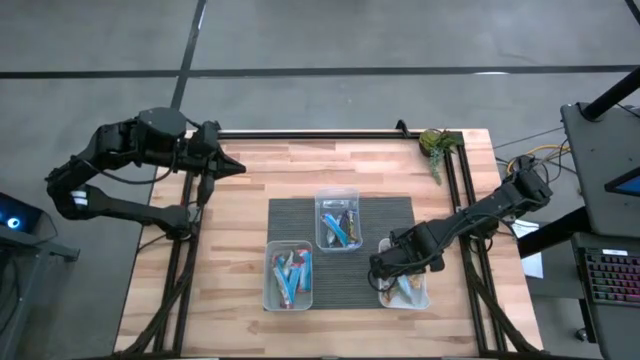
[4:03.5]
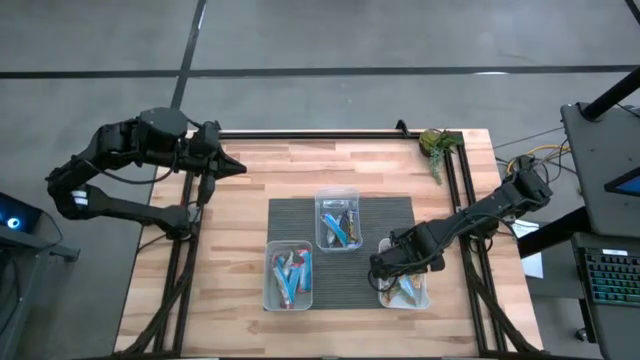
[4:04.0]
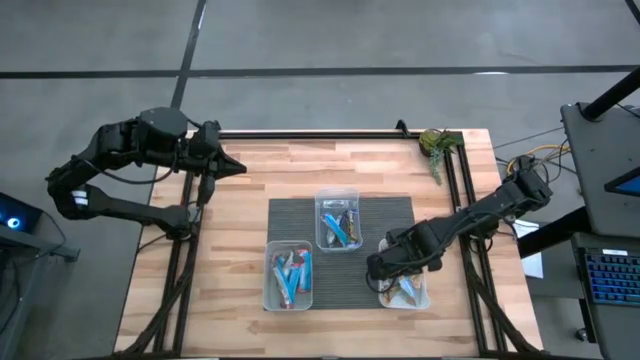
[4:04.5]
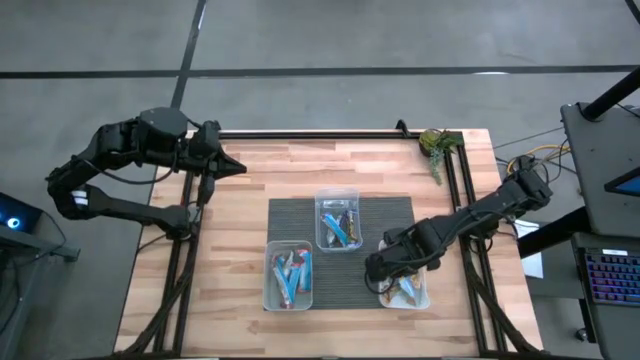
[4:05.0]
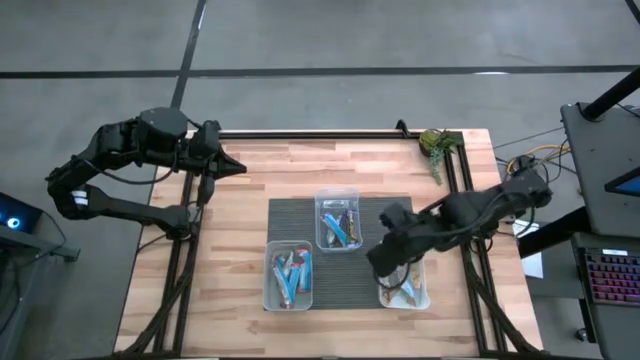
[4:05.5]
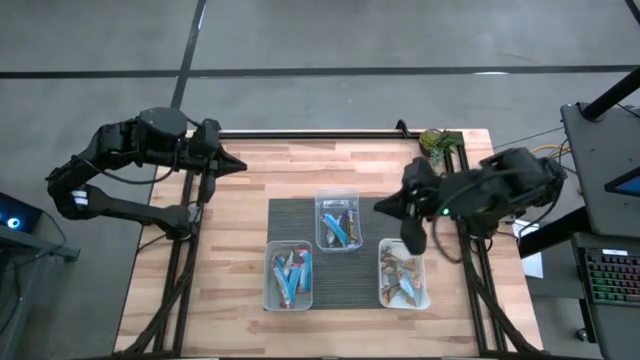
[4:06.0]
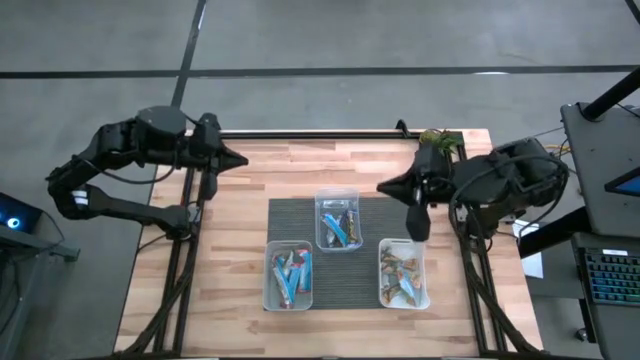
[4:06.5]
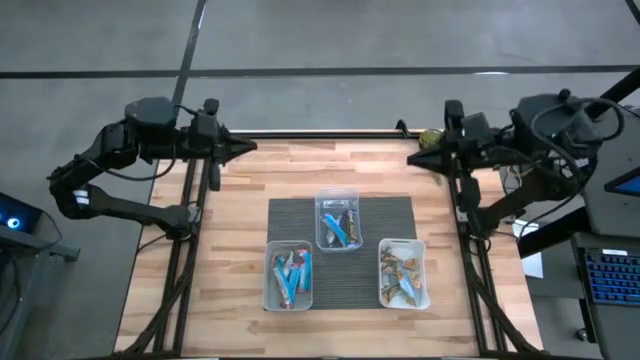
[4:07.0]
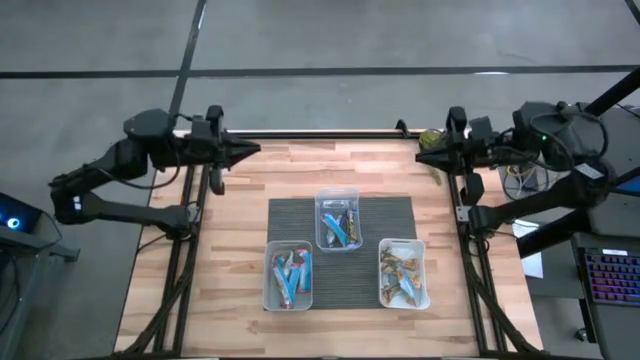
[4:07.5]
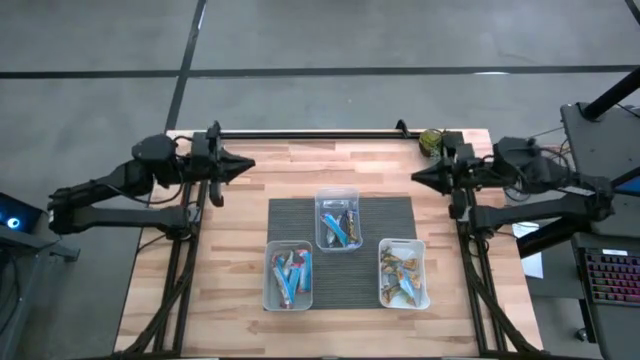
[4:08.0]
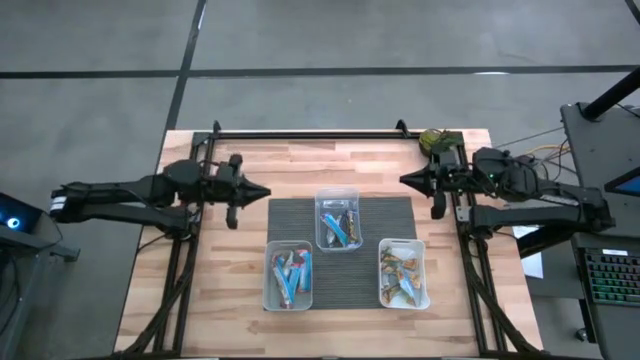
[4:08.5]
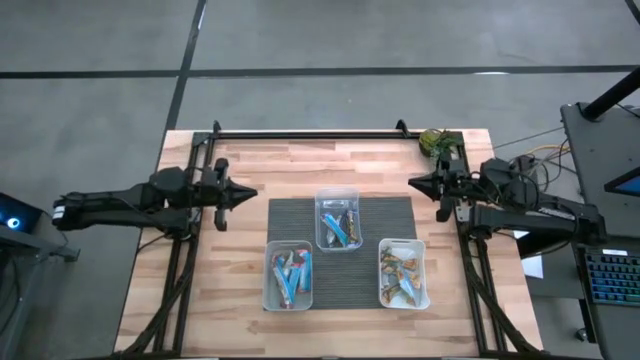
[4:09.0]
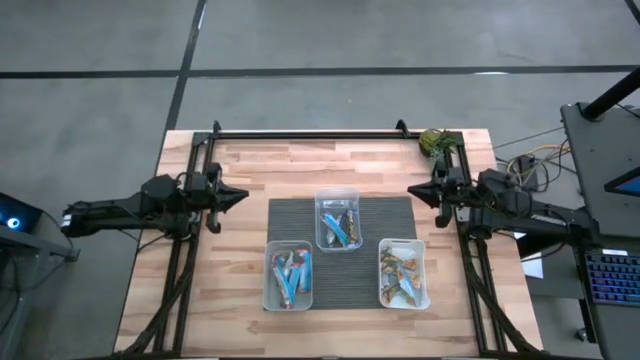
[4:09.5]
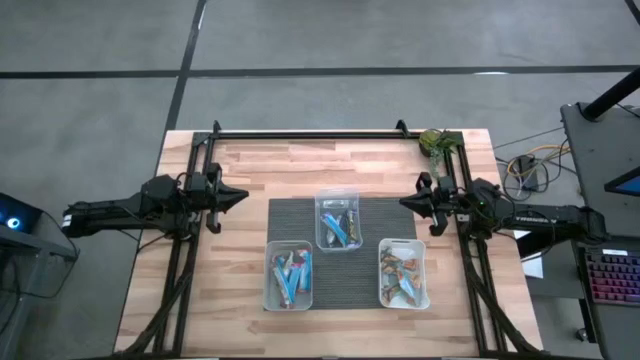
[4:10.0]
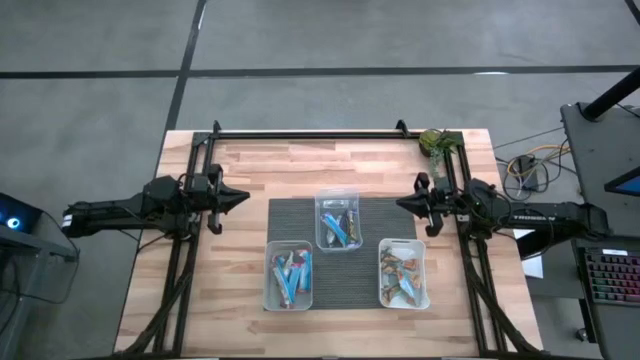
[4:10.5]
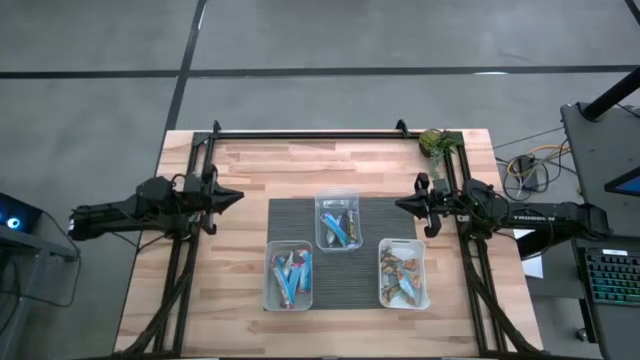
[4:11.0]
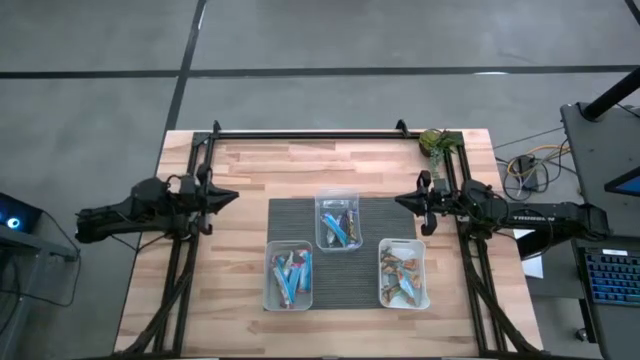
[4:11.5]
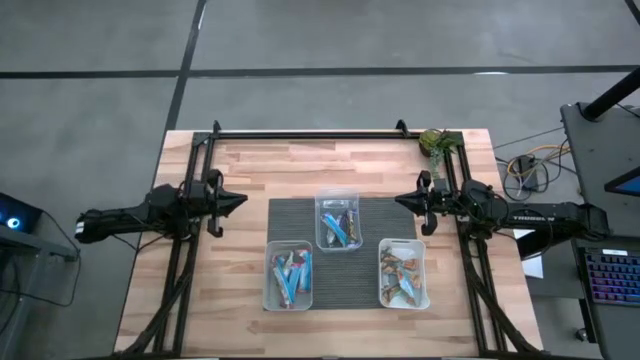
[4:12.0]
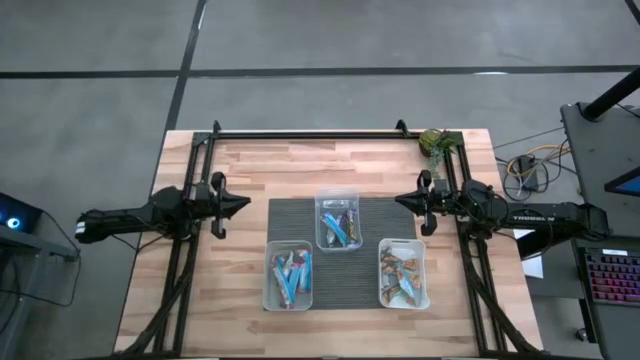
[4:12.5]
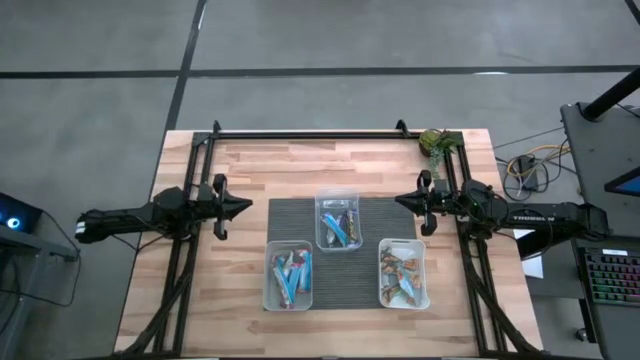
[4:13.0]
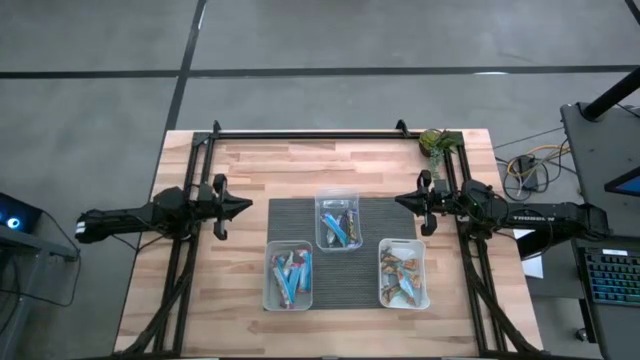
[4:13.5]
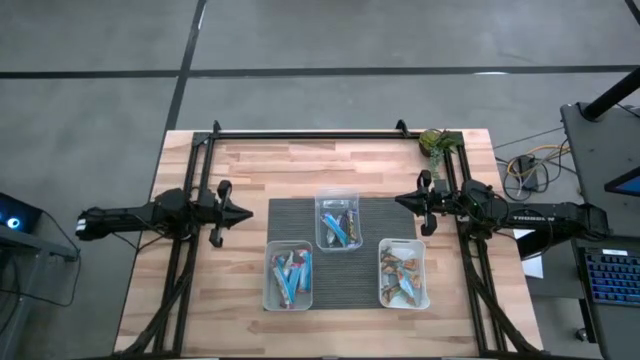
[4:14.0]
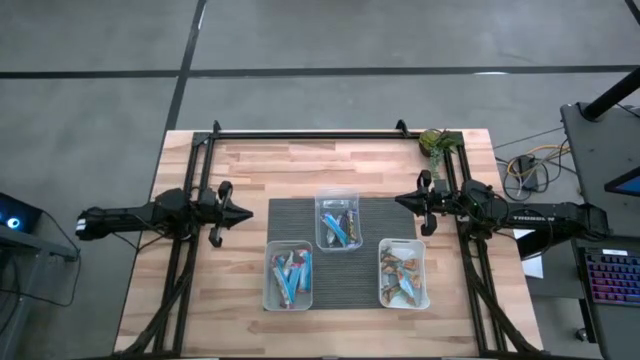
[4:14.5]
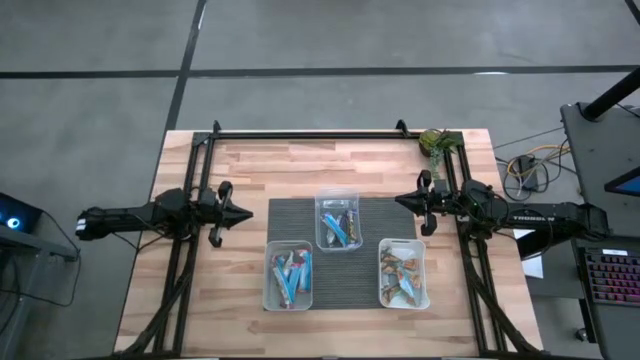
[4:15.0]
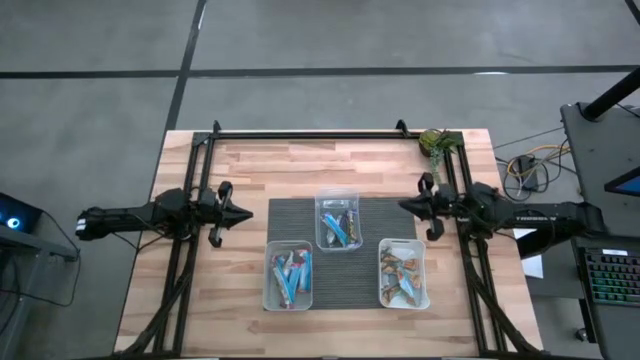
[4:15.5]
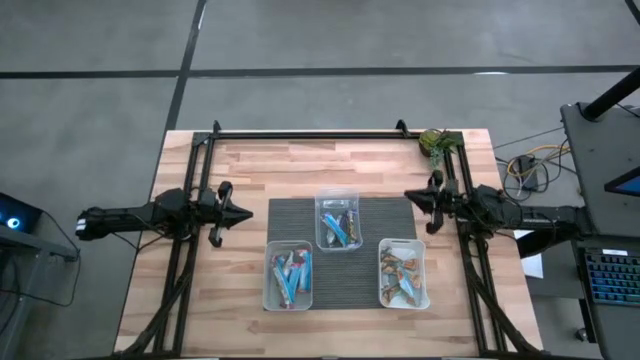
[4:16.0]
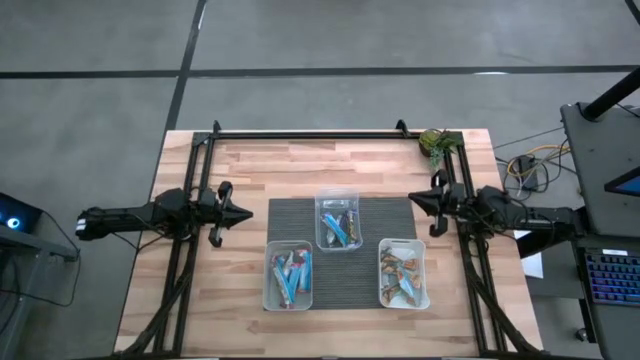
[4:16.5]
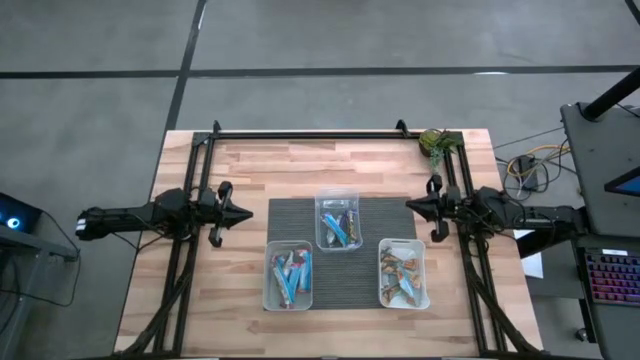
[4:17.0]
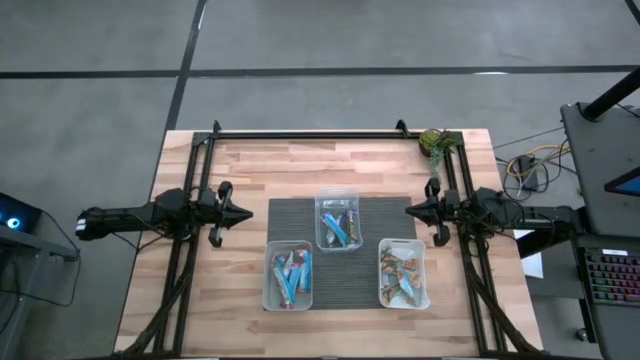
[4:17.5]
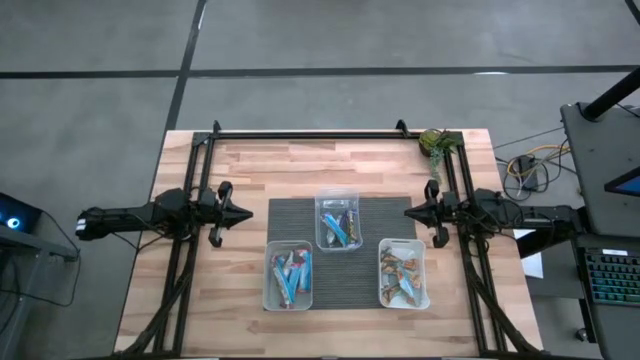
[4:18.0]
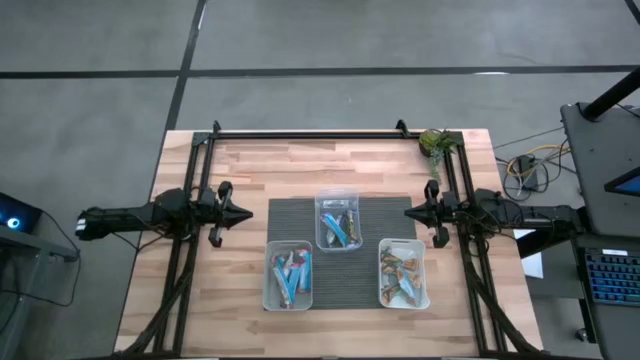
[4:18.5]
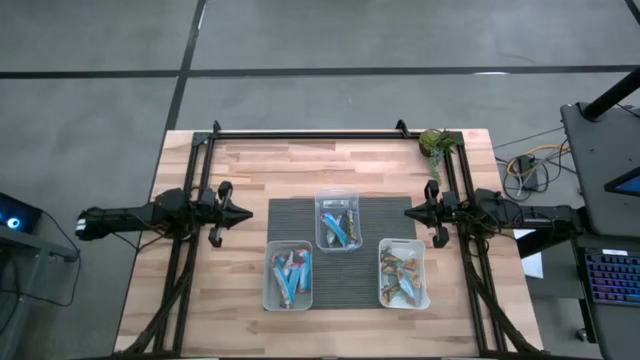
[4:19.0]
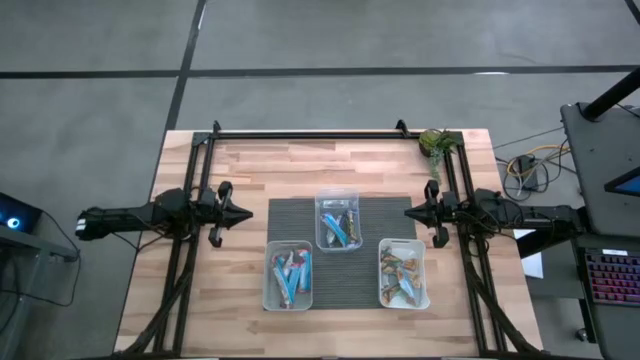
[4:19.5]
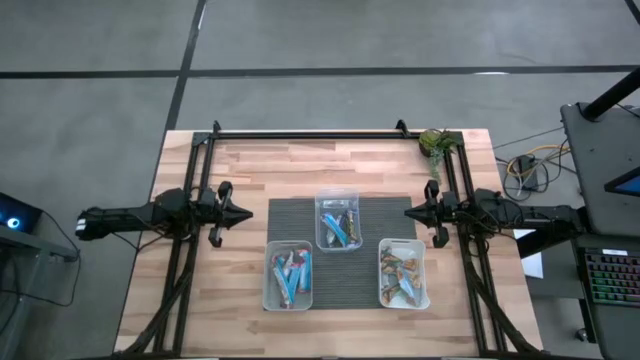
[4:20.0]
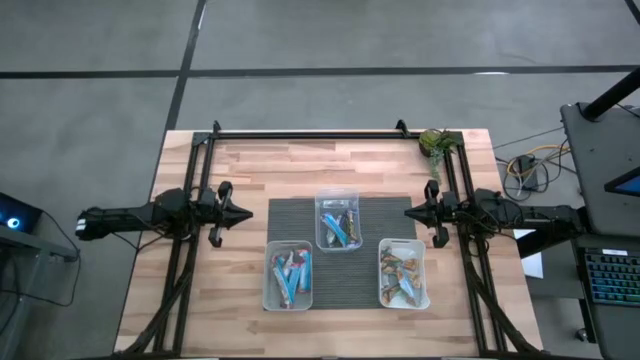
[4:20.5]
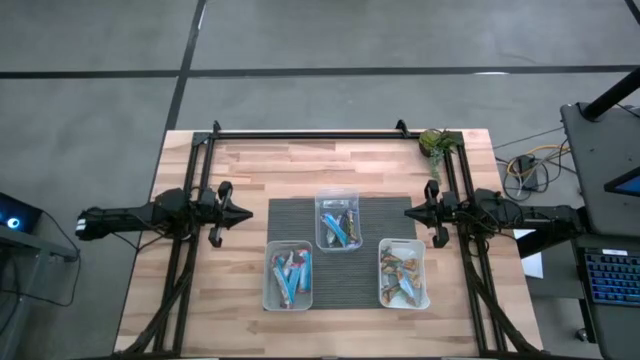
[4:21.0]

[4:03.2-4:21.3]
Task: Pick and place Granola Bars by type
Return to Home Position
